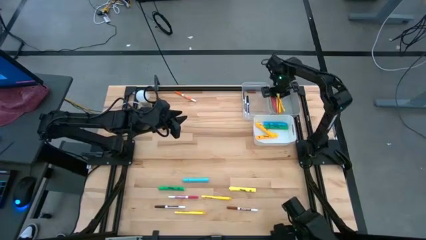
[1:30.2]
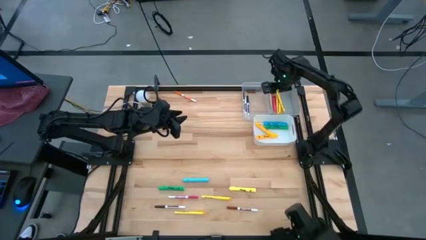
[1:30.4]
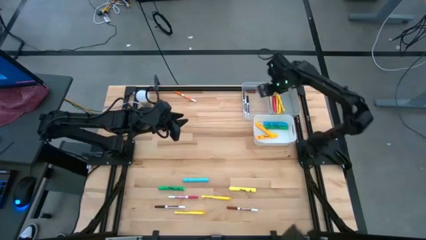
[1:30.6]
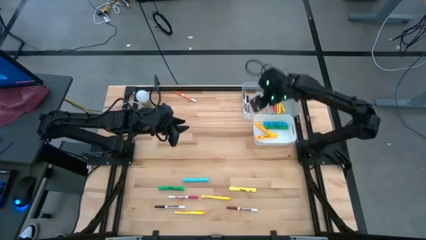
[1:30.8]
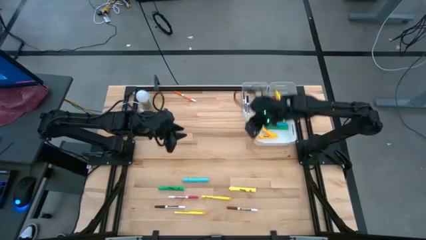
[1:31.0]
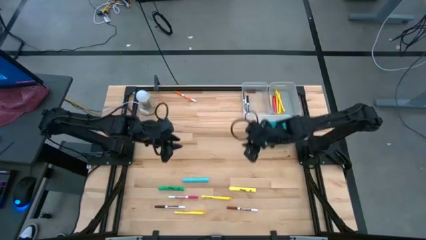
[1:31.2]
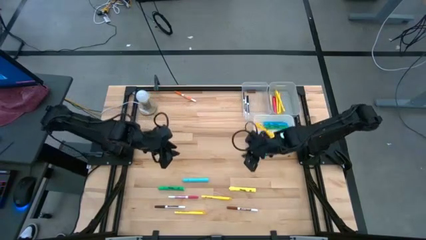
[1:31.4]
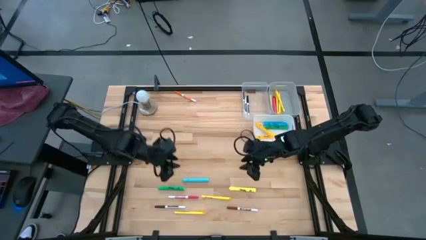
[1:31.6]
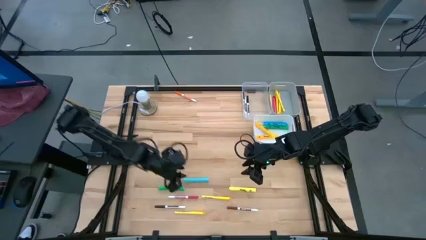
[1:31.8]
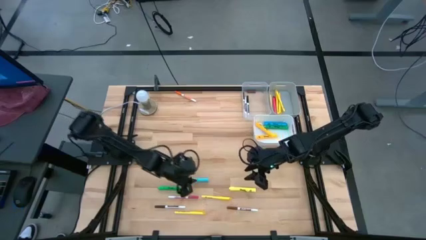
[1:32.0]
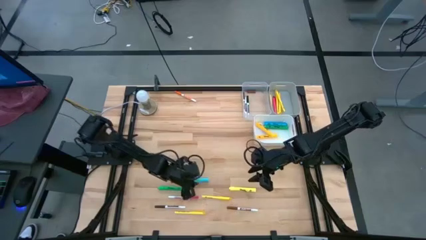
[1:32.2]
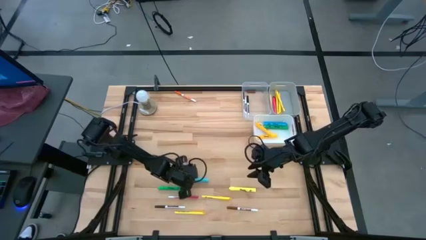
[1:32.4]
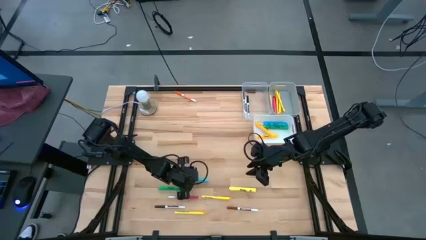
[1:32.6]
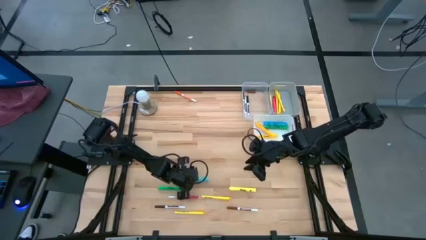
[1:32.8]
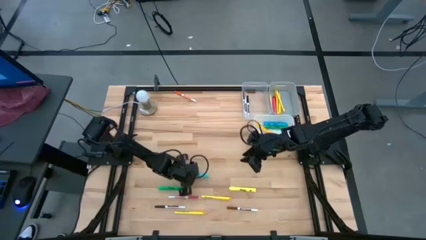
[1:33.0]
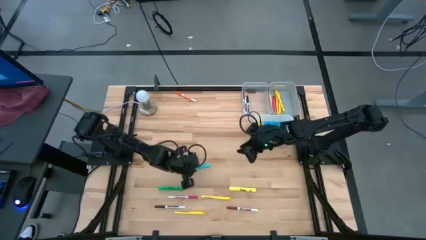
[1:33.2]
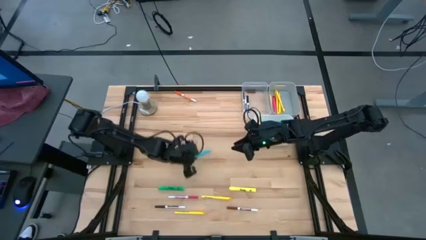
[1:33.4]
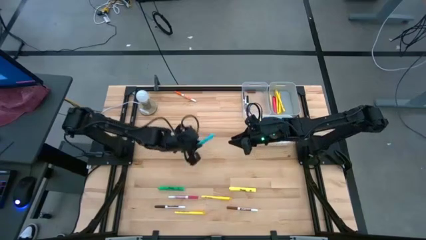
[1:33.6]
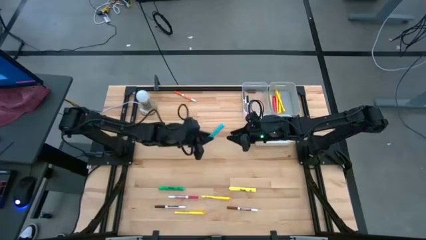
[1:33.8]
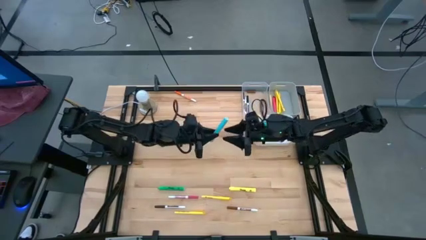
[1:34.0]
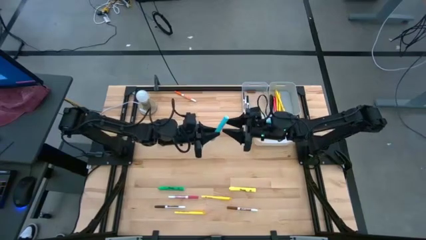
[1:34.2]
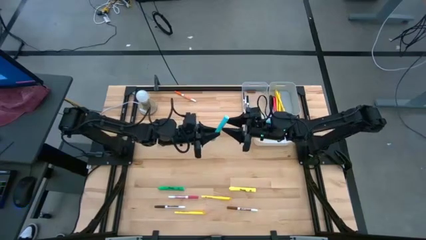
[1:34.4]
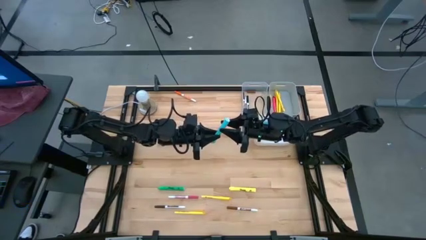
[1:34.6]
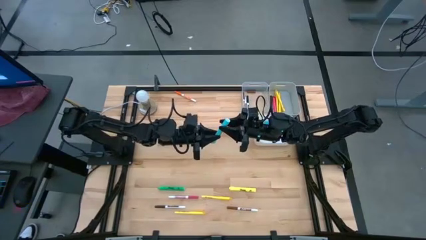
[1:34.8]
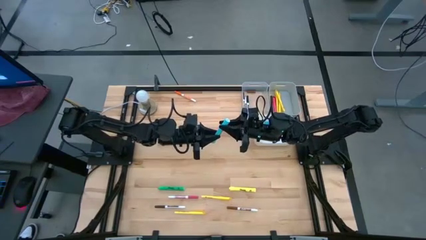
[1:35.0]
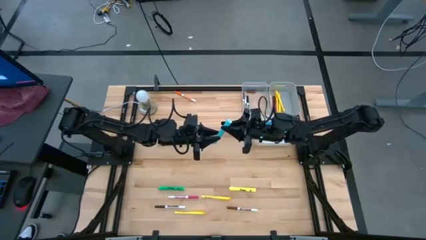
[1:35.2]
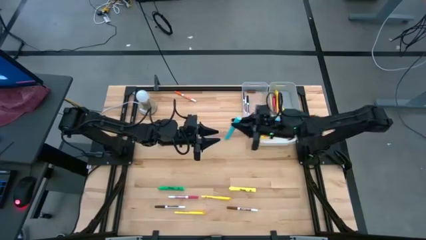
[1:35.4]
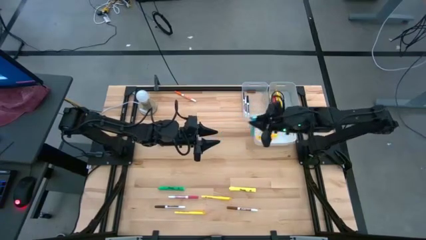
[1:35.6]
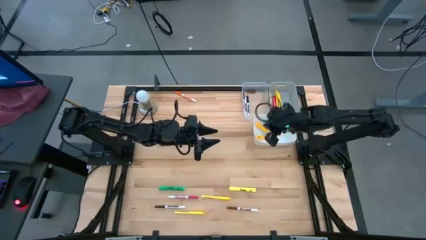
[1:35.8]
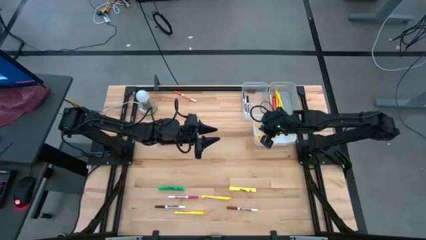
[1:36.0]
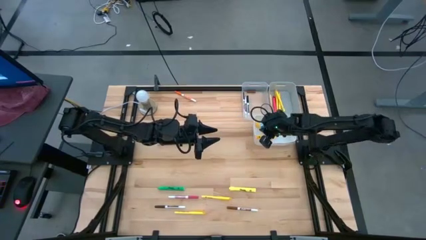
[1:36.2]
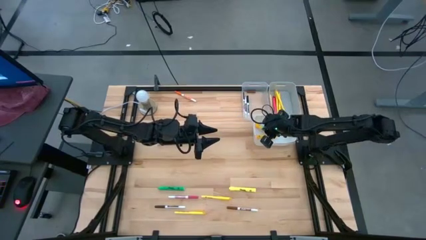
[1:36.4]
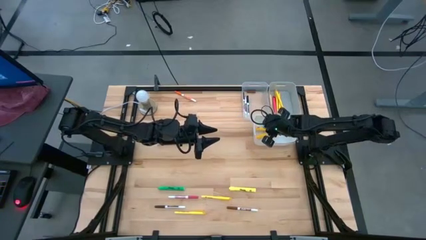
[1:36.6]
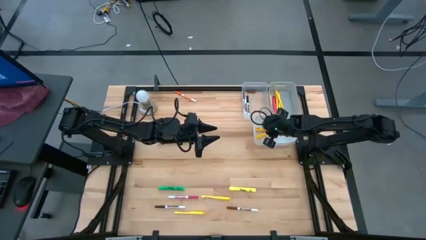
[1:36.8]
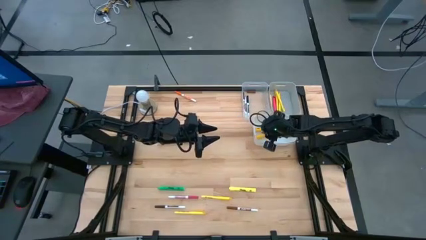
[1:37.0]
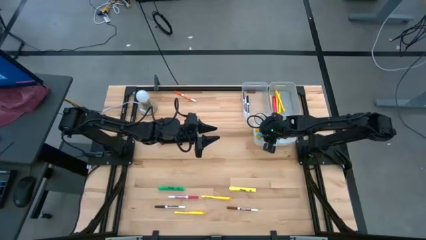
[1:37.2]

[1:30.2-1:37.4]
Task: Pick & Place Markers
Put the light blue highlighter pen into the white bin

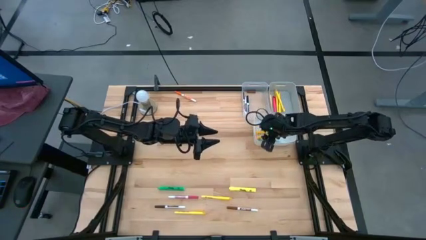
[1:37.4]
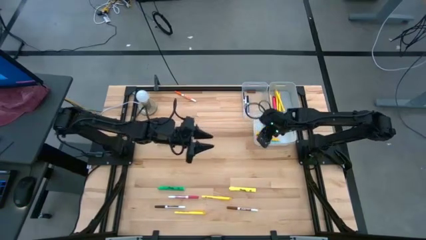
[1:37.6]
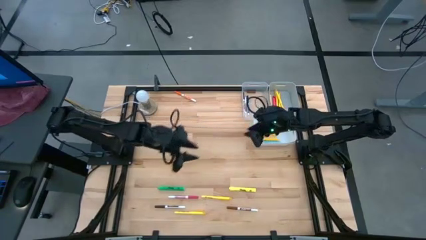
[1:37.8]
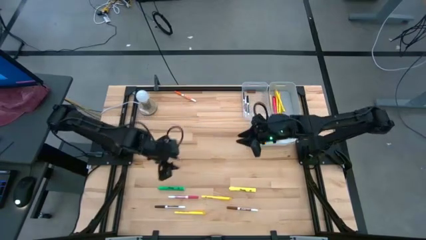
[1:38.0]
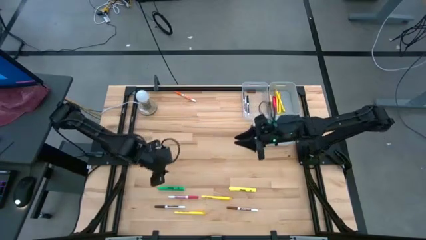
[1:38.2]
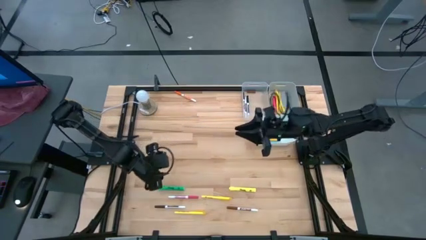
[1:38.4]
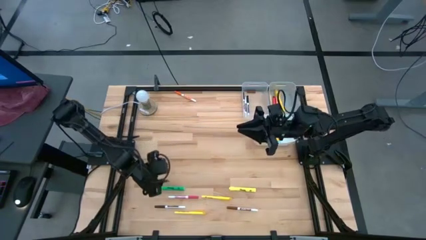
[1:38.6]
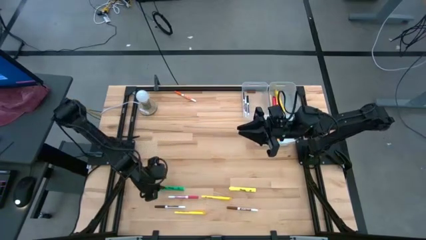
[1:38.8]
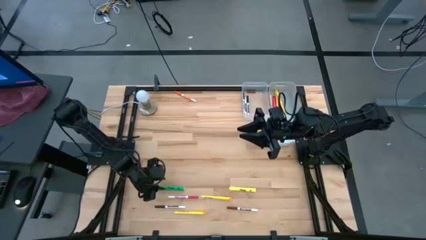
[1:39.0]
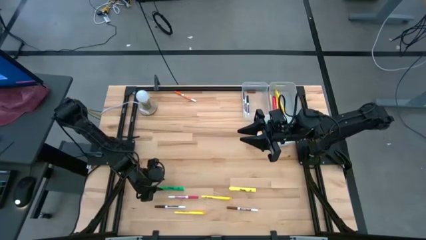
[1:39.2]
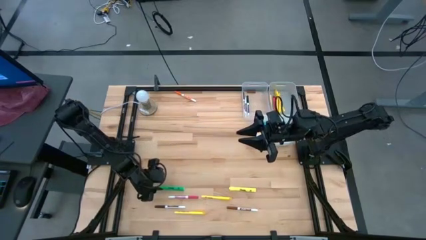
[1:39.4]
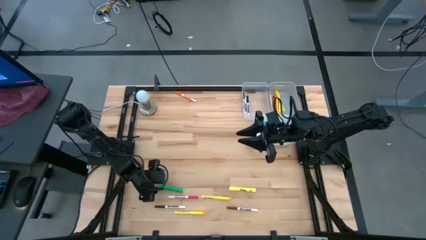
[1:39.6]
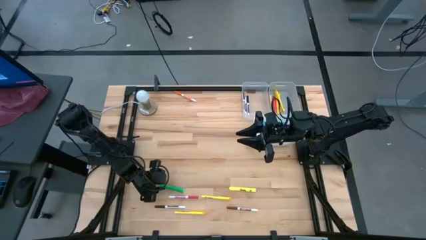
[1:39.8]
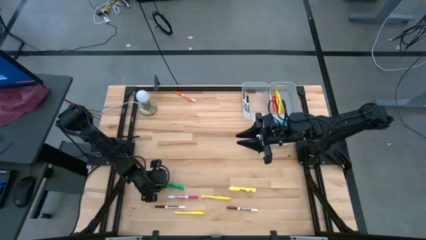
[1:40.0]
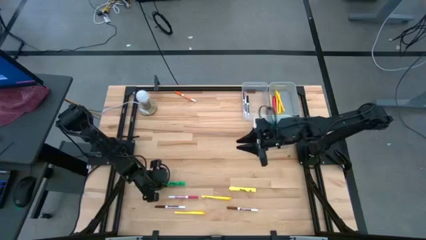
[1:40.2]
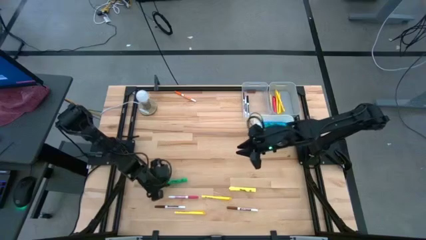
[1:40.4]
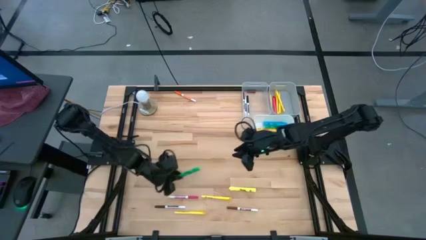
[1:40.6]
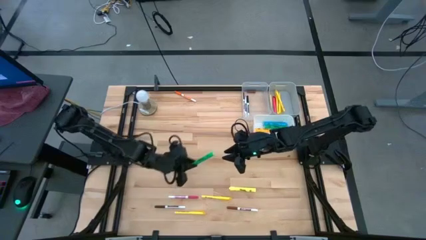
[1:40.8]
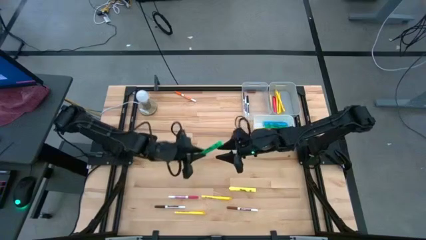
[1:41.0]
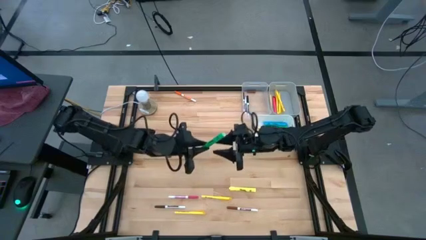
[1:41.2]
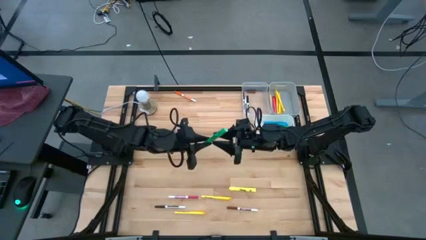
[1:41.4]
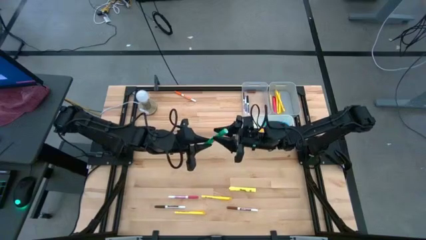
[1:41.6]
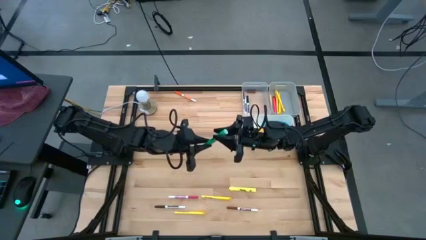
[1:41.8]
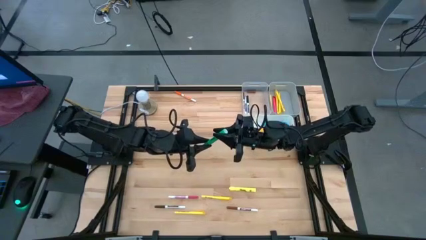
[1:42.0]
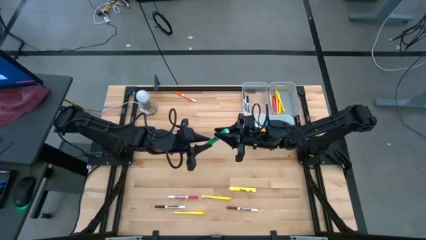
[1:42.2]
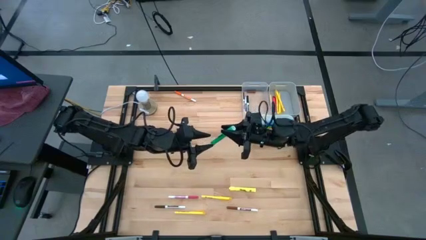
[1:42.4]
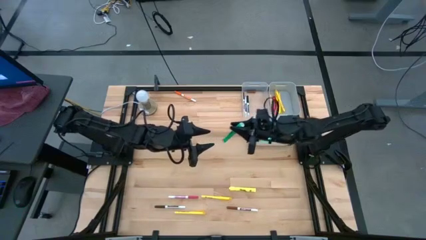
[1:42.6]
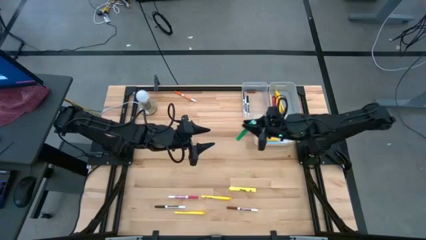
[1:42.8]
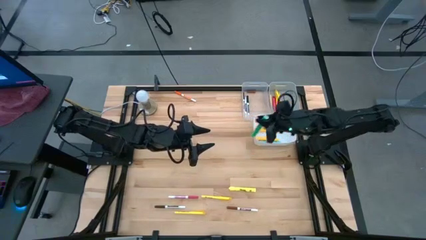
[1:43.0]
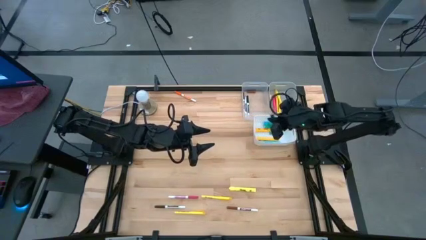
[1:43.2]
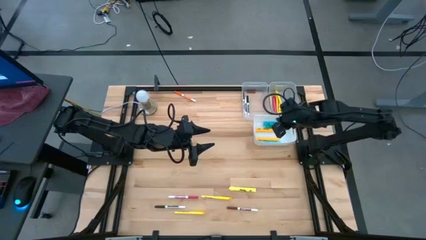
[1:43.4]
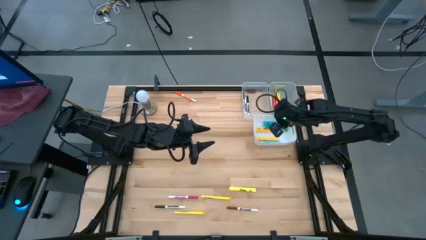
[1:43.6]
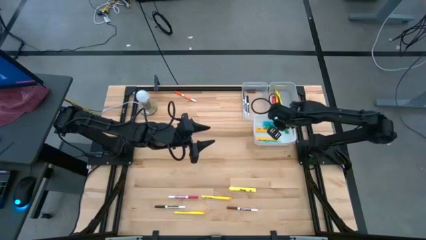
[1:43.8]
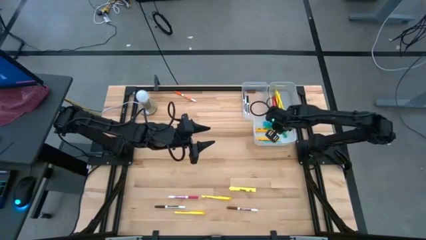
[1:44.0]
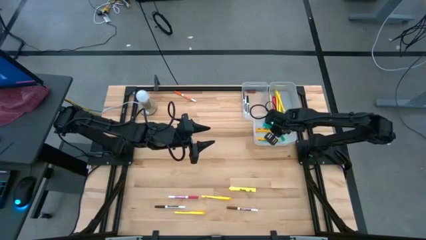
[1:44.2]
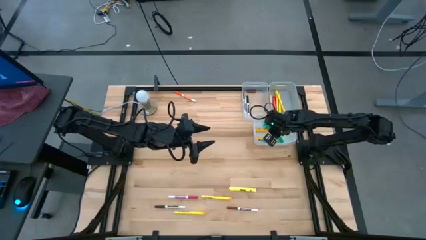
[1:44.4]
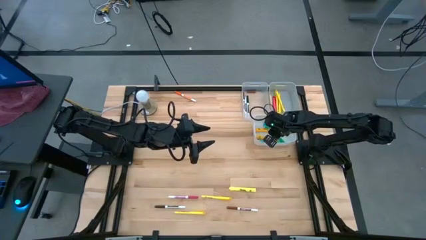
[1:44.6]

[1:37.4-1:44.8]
Put the green highlighter pen into the white bin

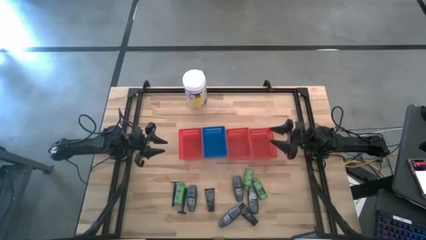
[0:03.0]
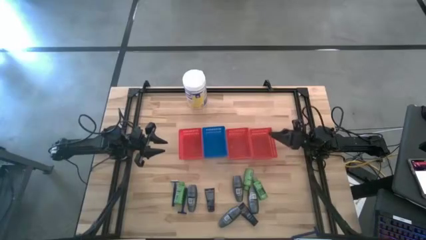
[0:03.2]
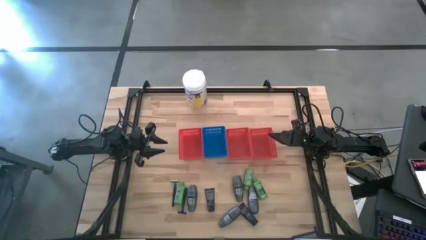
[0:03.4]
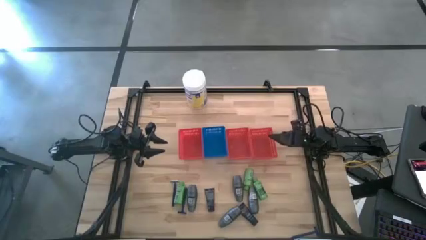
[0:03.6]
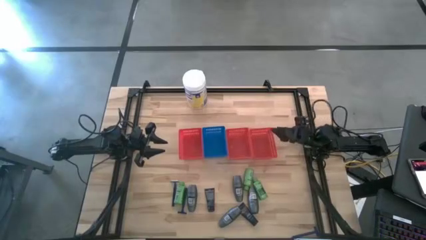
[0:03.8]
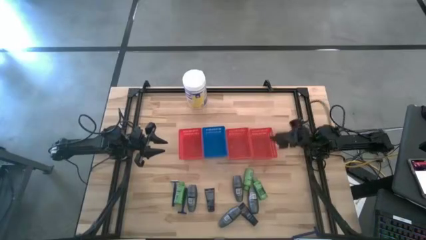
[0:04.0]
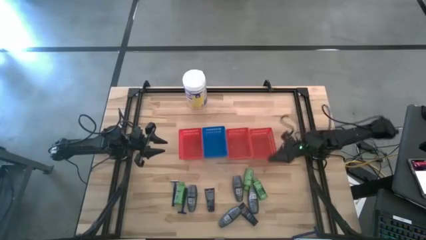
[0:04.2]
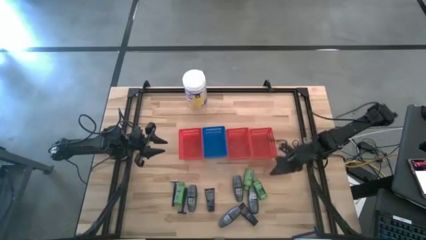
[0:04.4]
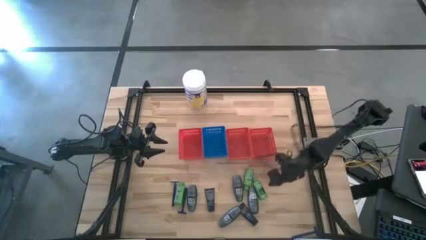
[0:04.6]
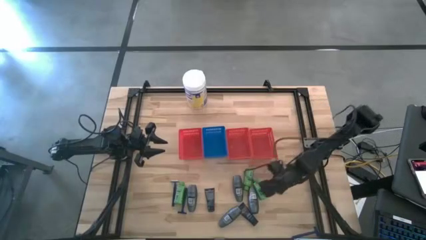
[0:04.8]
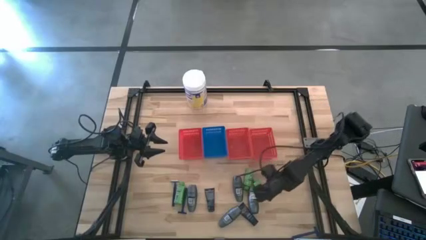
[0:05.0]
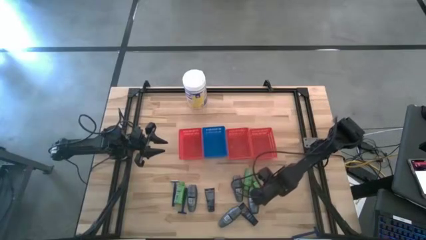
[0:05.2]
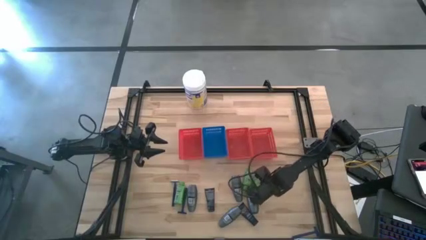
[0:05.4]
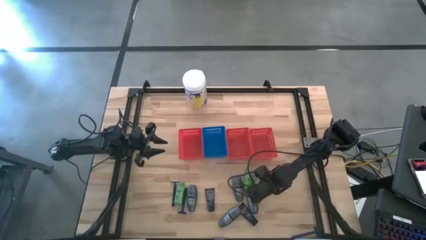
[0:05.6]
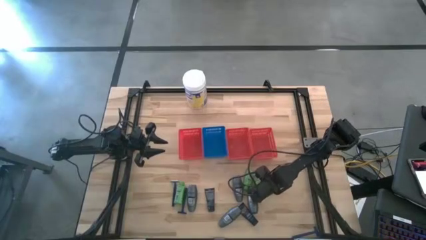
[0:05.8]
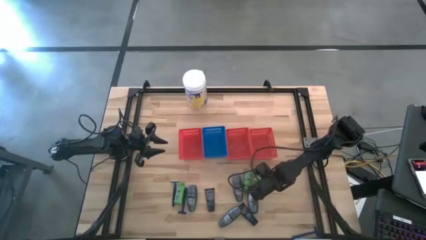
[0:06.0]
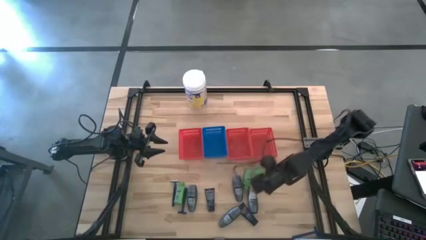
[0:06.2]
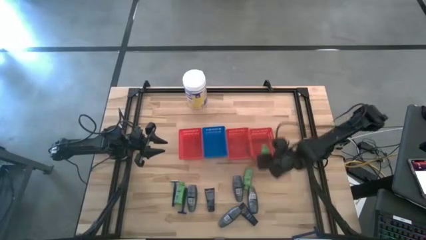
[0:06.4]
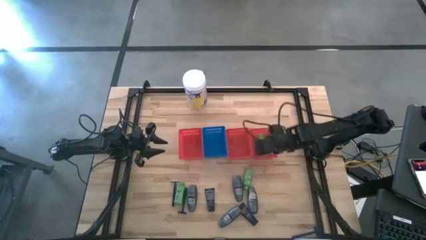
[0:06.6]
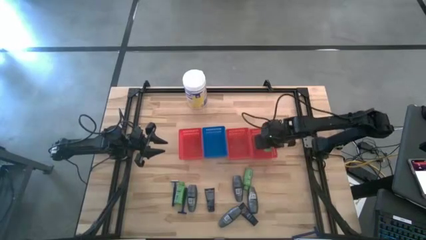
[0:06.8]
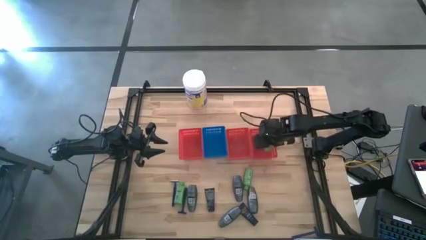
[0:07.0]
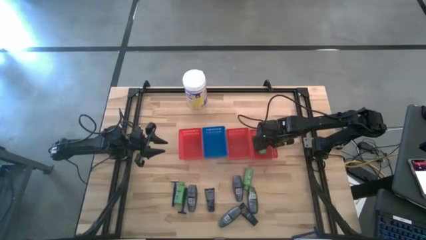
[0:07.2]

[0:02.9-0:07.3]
Task: Pick & Place Travel size toiletries
Put the right green shampoo into the right red bin
